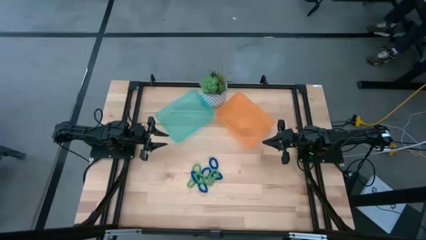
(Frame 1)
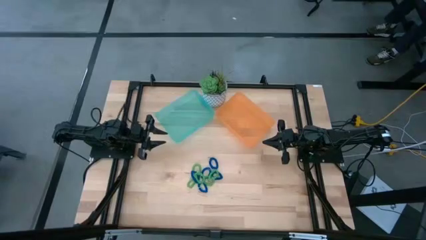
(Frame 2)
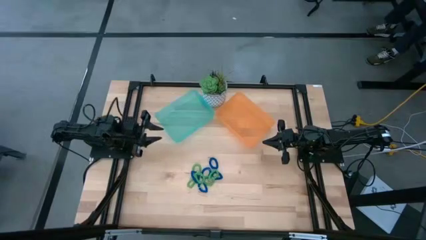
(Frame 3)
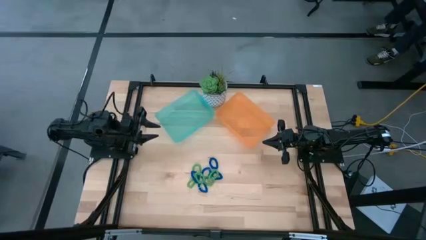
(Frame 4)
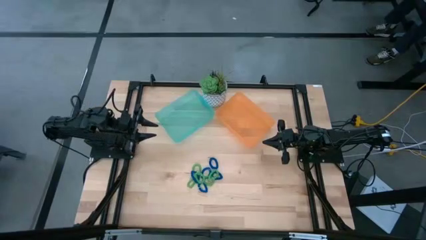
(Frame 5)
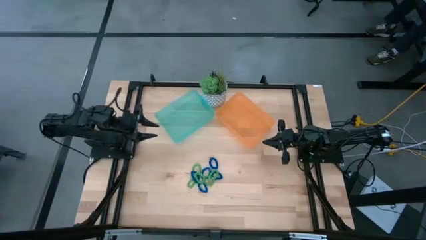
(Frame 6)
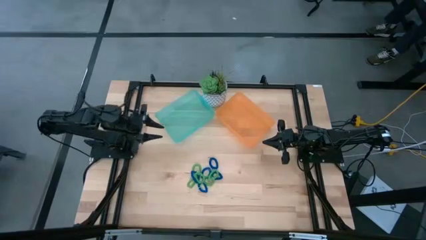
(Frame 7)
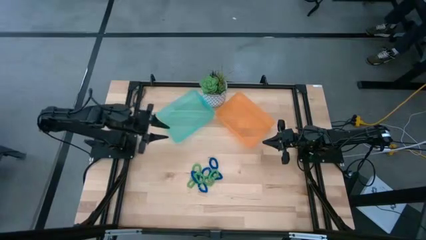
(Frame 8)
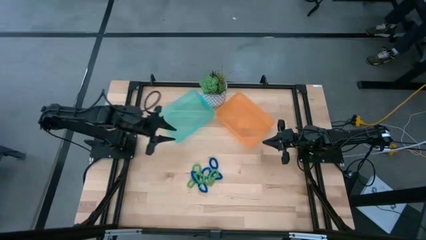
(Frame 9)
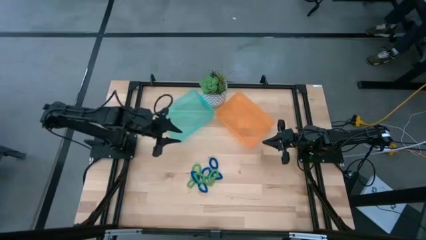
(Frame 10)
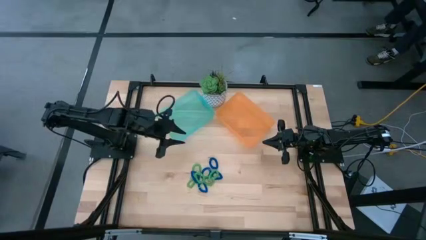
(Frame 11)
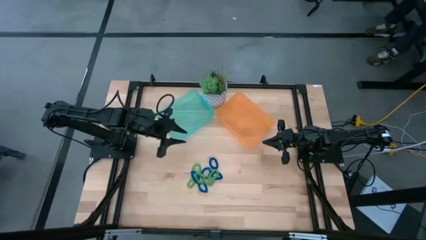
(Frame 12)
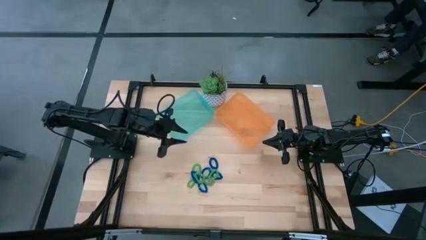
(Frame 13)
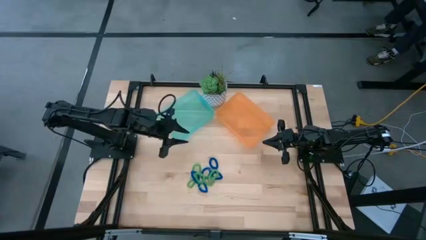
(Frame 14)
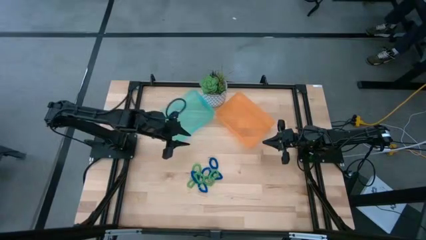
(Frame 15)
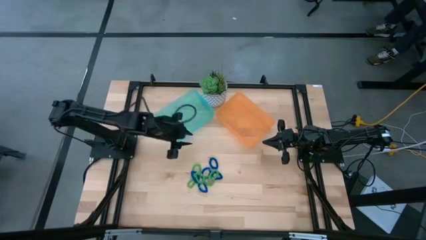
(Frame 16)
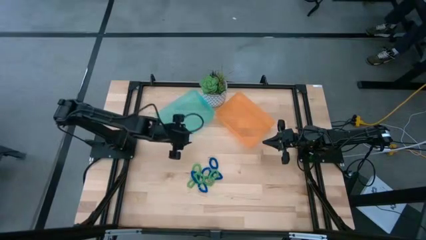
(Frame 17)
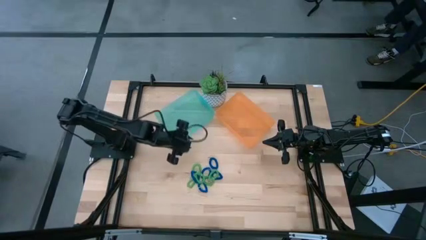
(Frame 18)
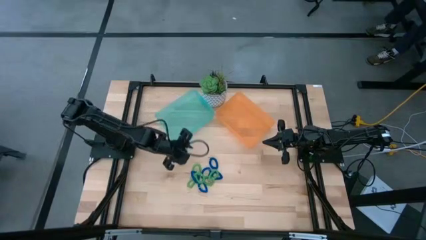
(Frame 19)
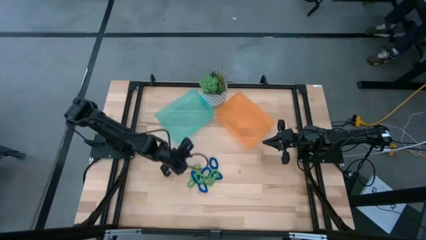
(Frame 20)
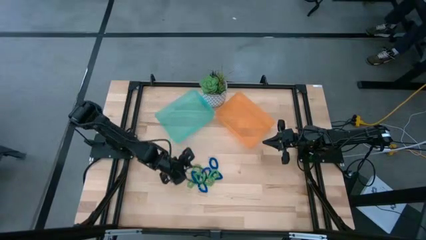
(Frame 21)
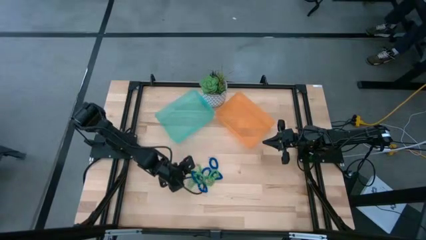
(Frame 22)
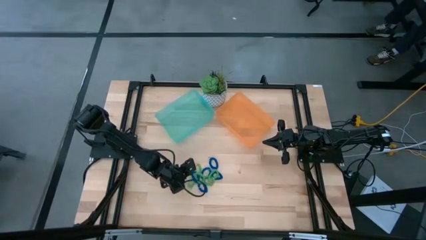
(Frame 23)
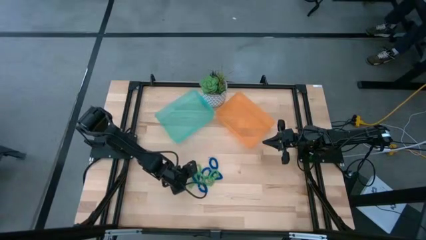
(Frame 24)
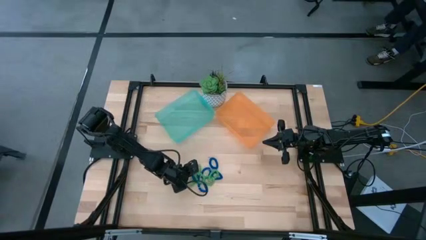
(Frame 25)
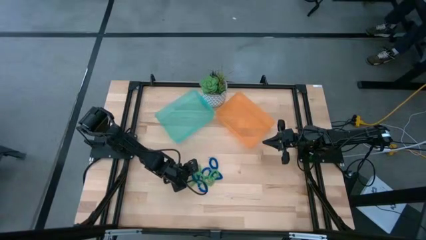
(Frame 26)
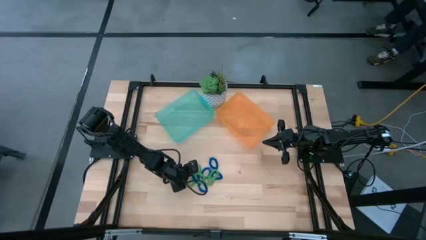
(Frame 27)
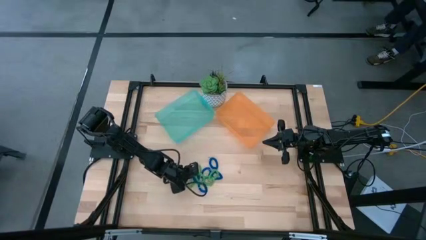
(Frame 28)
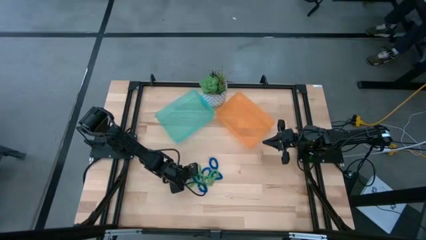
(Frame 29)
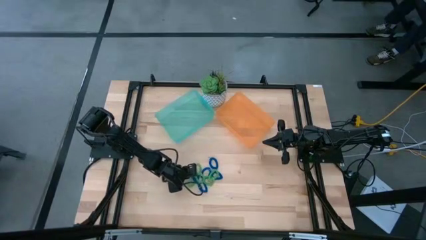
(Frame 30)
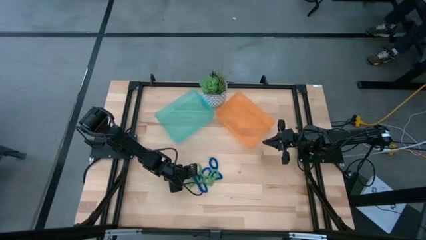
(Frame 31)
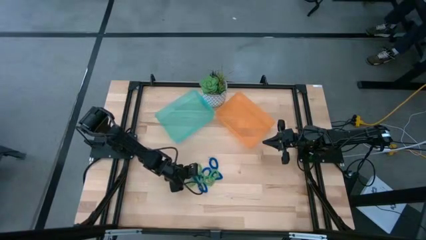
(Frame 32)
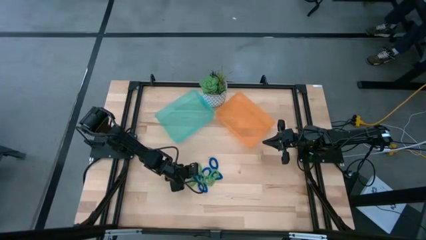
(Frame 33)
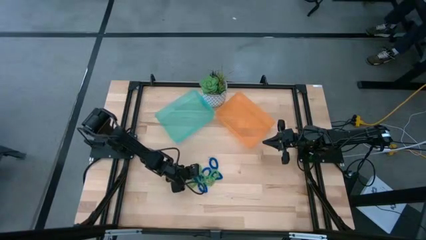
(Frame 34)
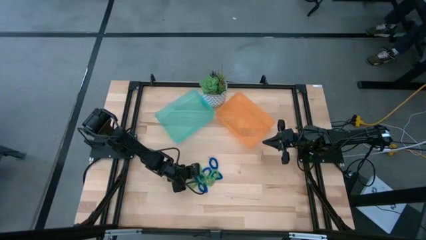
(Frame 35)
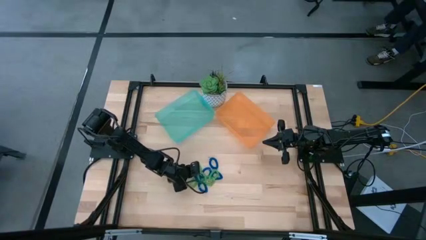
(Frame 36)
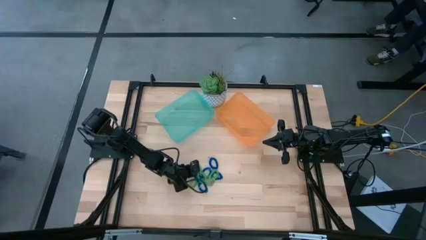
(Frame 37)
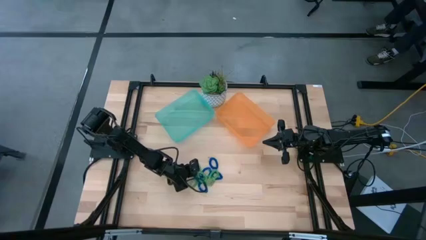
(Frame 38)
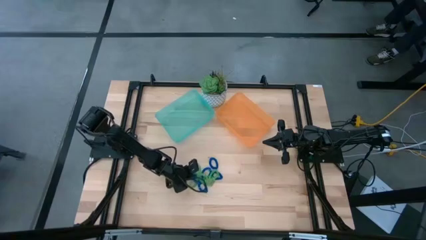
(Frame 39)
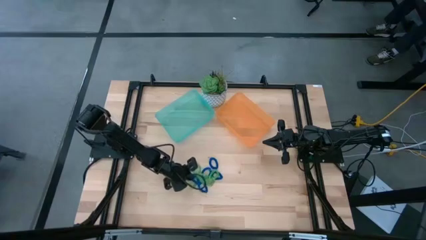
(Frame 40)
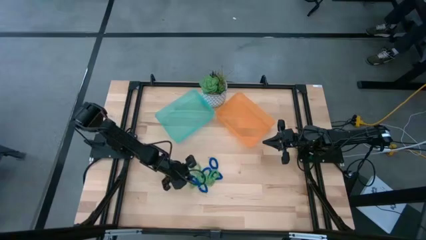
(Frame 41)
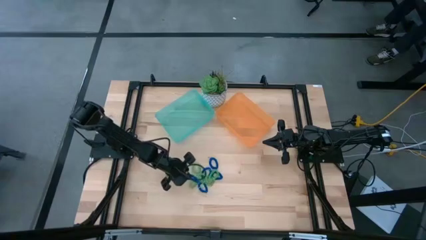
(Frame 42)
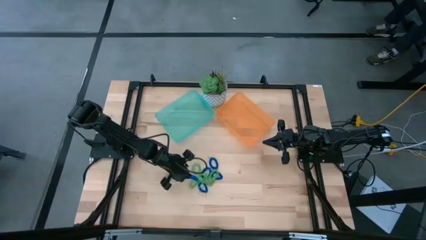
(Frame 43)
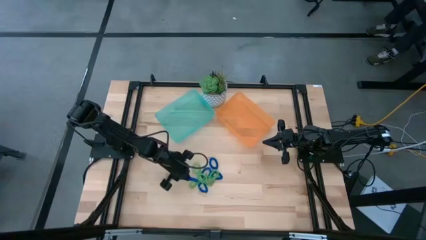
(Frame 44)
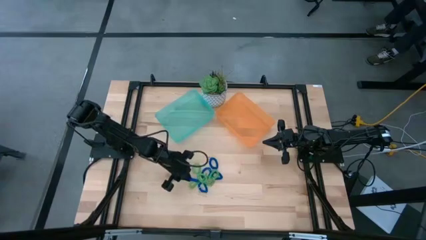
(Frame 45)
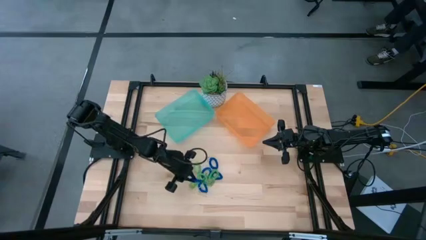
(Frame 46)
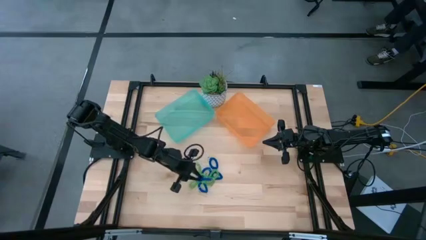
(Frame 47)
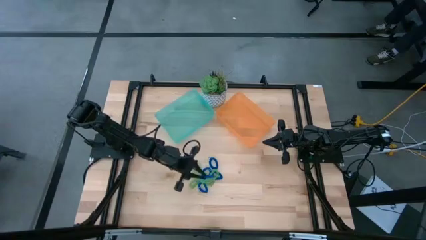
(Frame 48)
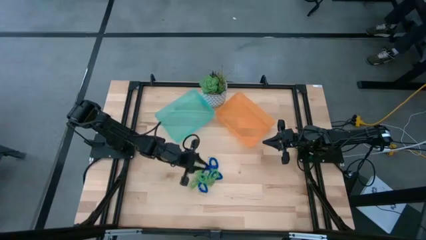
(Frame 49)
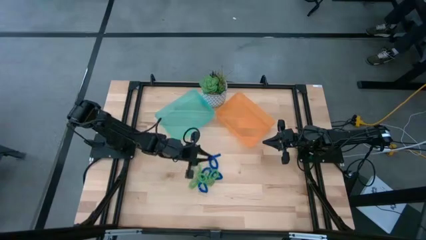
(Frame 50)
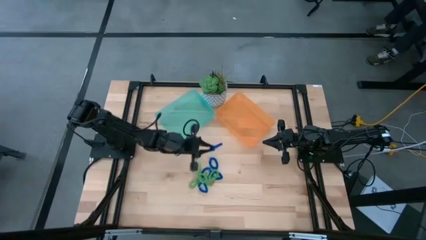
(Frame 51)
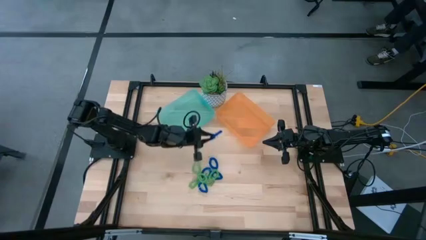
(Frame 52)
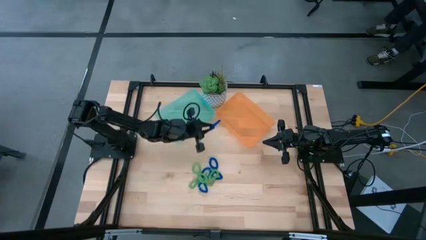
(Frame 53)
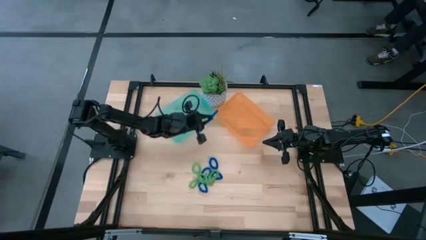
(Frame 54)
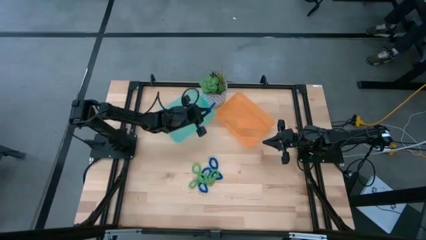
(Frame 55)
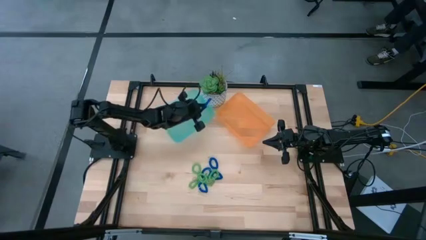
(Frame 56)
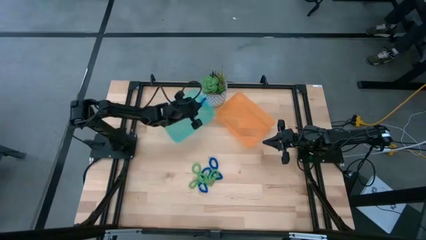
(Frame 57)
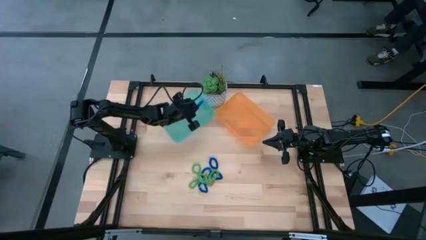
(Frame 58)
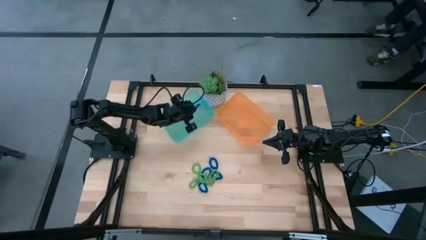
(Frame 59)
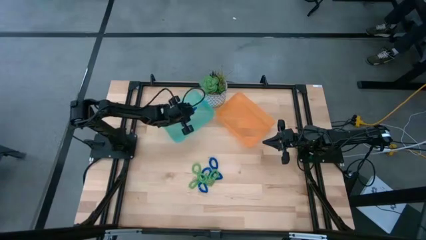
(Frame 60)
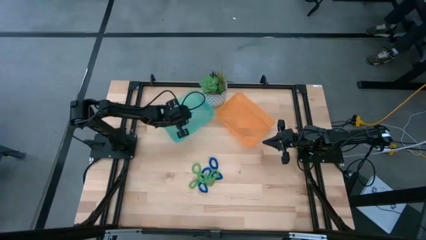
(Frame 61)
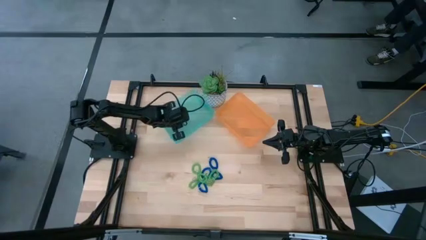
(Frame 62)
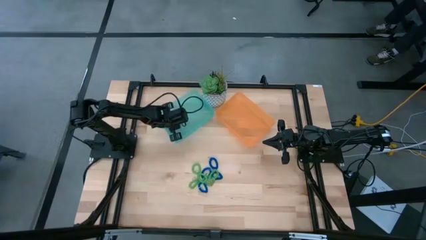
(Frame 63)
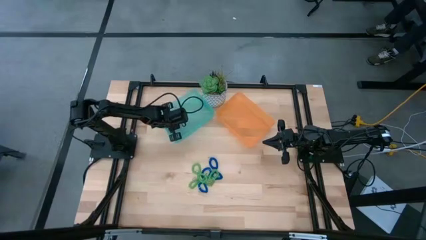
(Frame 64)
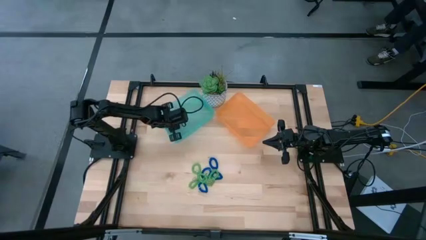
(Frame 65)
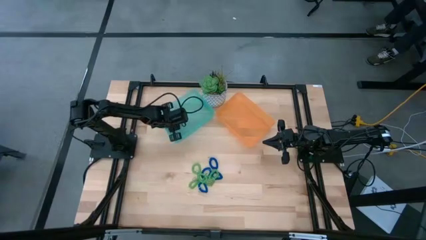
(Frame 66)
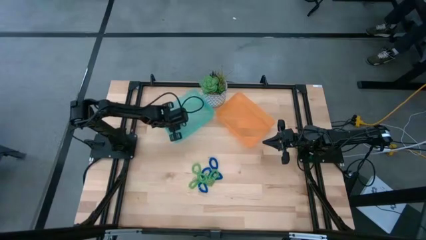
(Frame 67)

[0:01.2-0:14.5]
Task: Sort spring keychains
Put the blue spring keychain into the green bin
